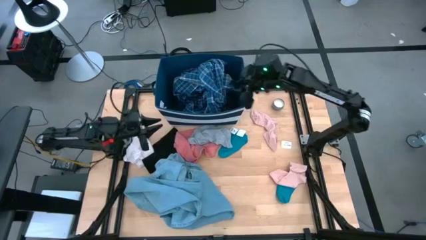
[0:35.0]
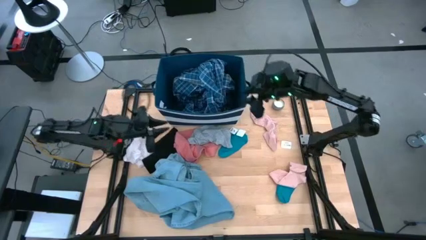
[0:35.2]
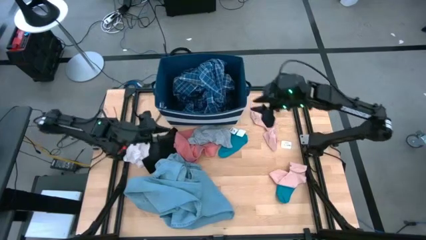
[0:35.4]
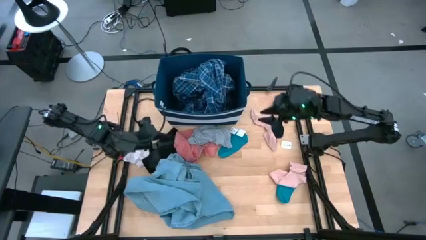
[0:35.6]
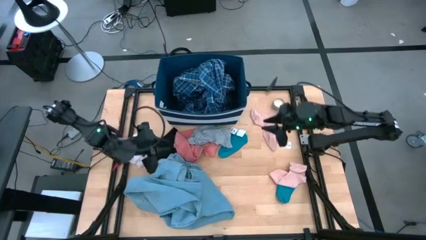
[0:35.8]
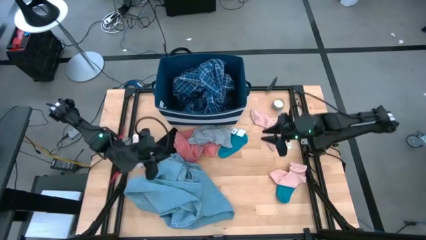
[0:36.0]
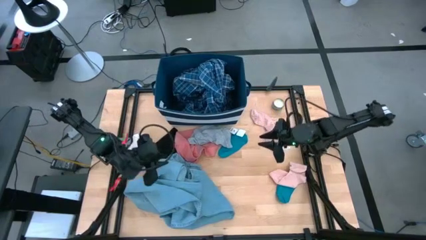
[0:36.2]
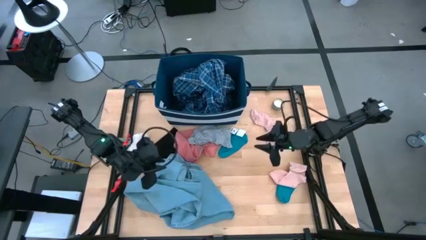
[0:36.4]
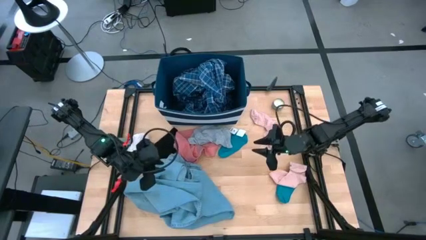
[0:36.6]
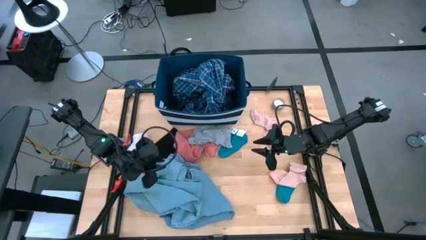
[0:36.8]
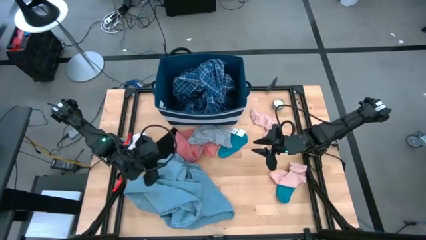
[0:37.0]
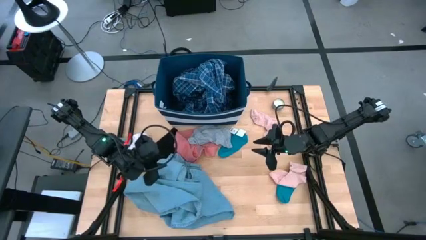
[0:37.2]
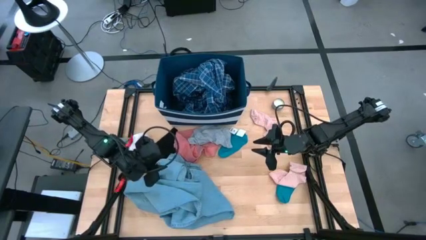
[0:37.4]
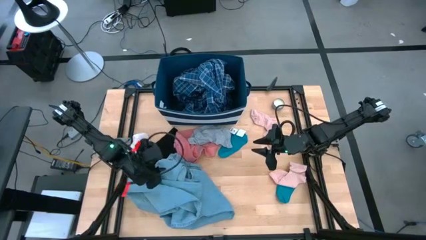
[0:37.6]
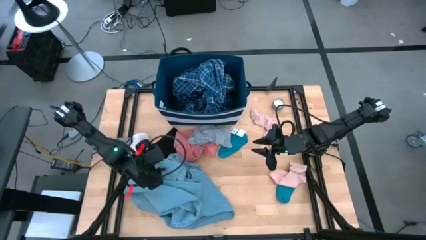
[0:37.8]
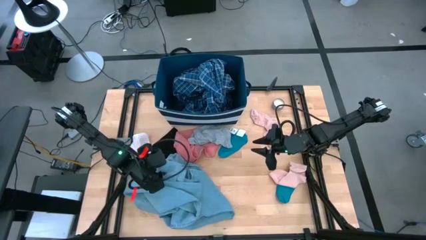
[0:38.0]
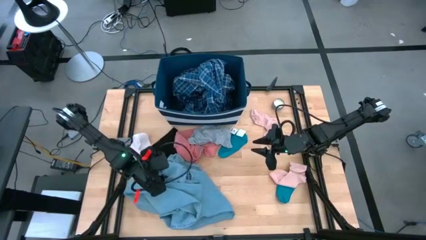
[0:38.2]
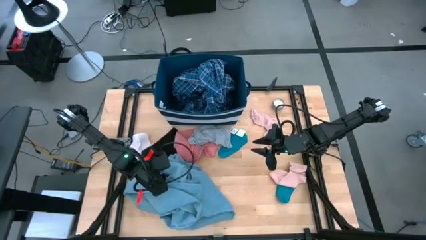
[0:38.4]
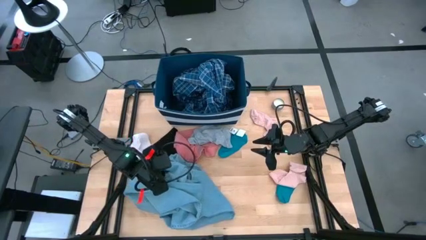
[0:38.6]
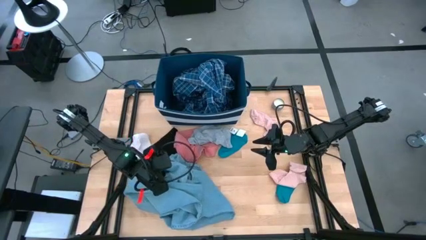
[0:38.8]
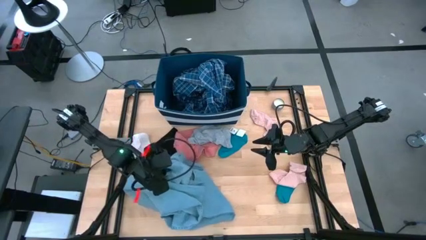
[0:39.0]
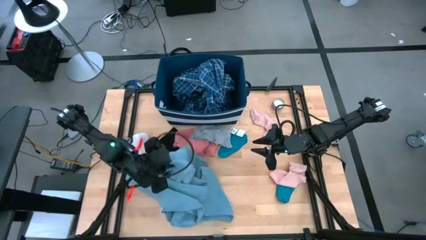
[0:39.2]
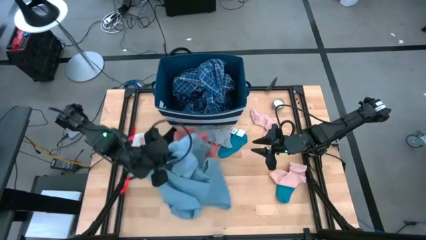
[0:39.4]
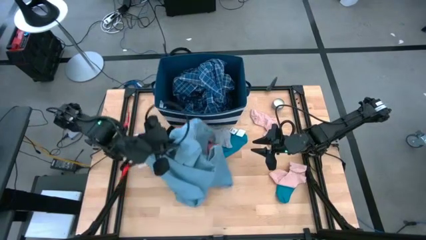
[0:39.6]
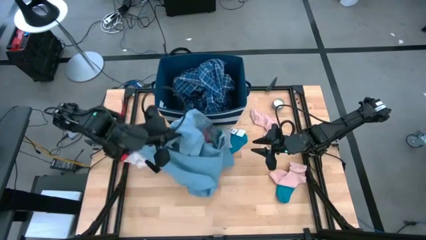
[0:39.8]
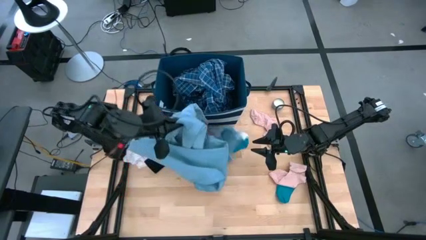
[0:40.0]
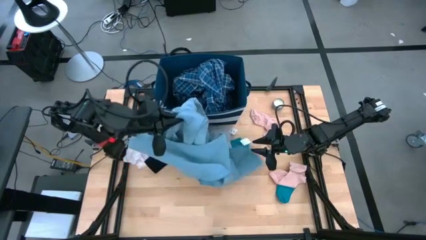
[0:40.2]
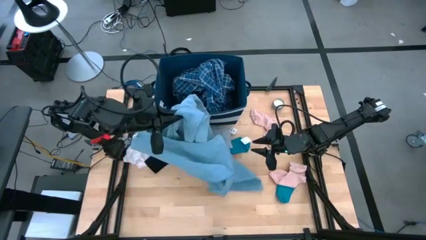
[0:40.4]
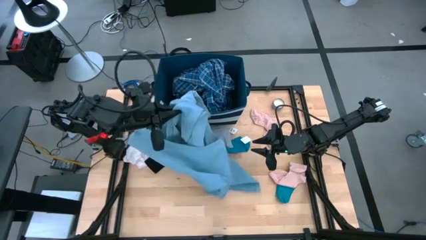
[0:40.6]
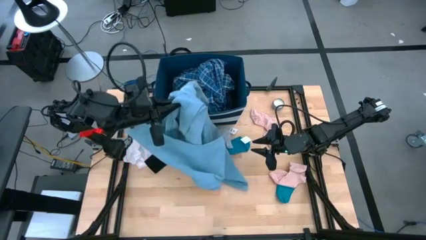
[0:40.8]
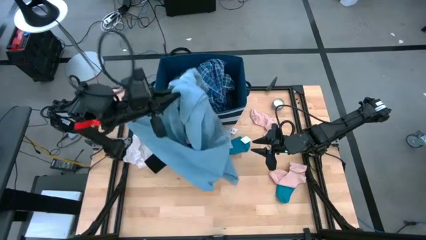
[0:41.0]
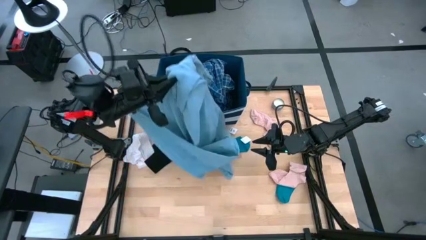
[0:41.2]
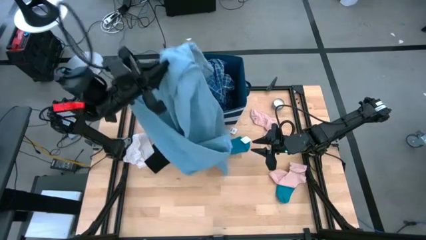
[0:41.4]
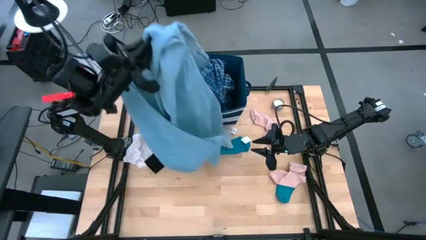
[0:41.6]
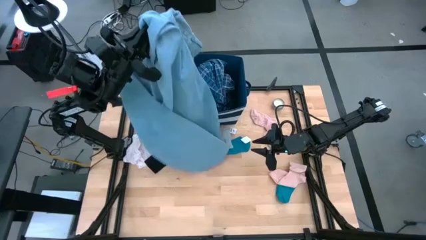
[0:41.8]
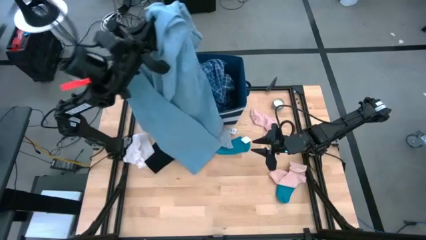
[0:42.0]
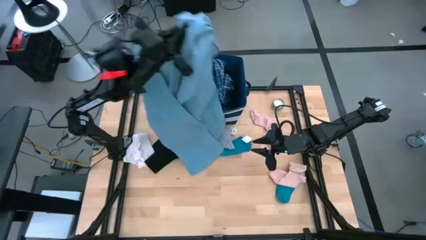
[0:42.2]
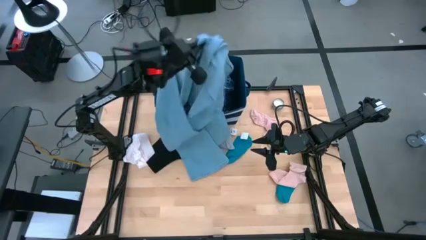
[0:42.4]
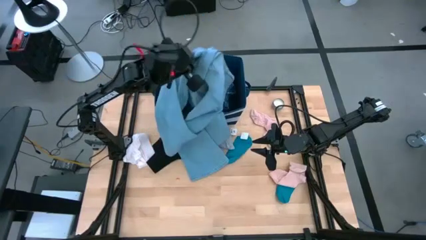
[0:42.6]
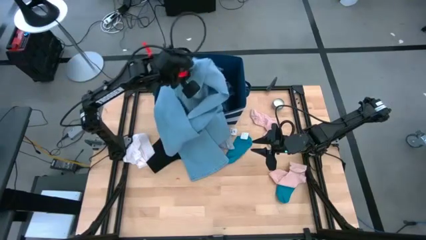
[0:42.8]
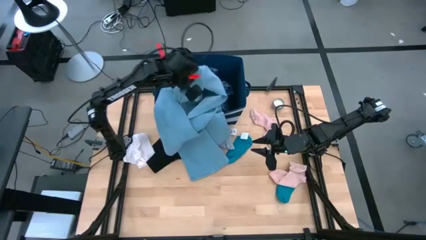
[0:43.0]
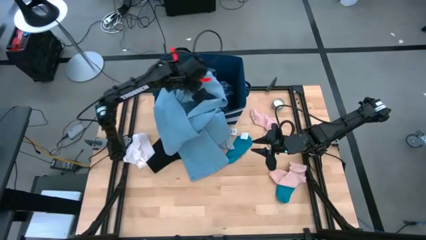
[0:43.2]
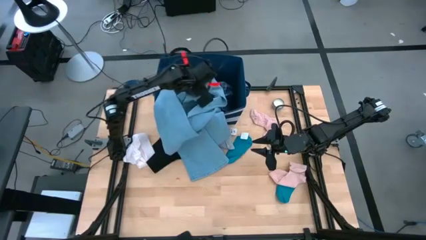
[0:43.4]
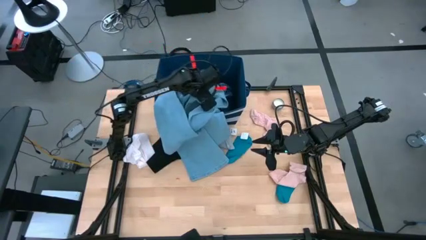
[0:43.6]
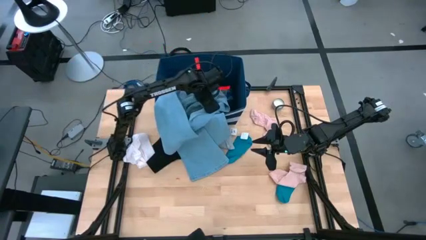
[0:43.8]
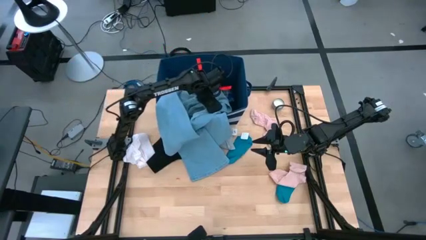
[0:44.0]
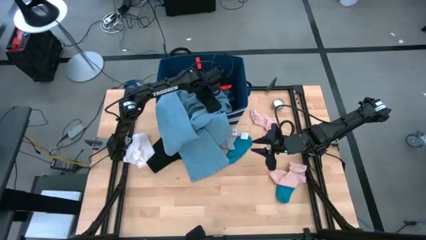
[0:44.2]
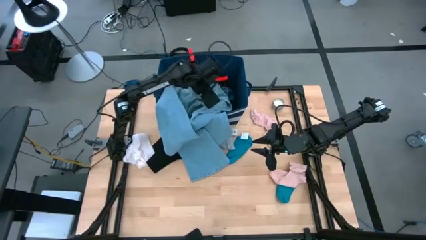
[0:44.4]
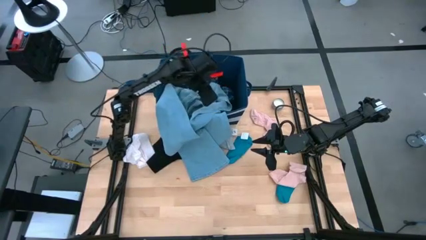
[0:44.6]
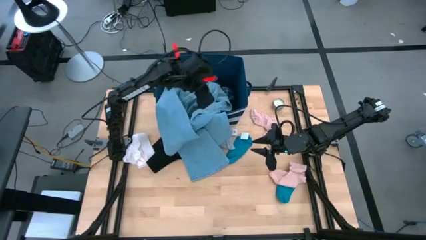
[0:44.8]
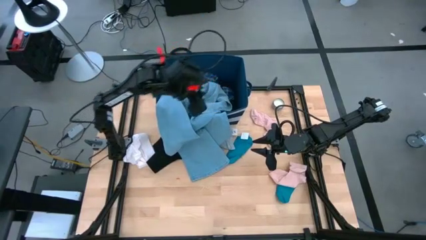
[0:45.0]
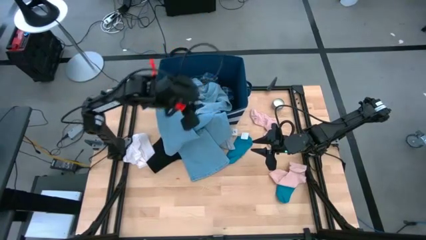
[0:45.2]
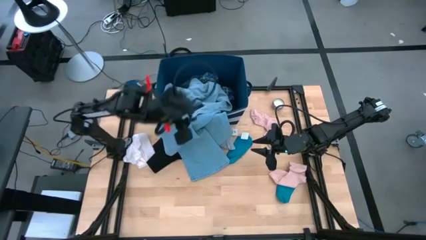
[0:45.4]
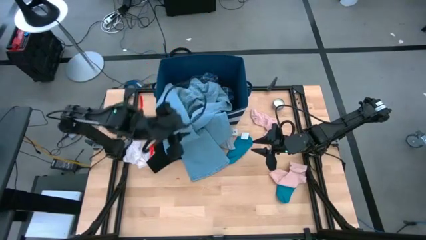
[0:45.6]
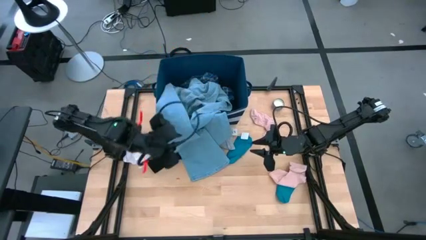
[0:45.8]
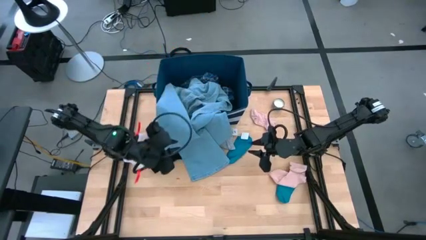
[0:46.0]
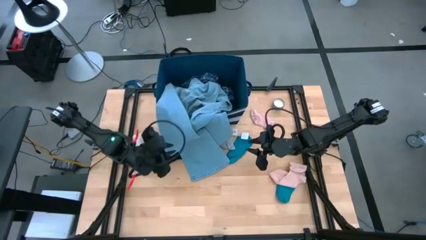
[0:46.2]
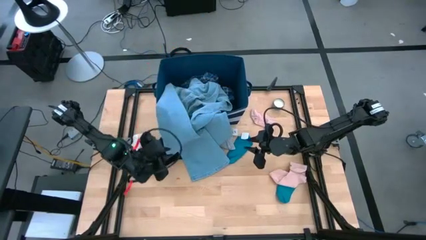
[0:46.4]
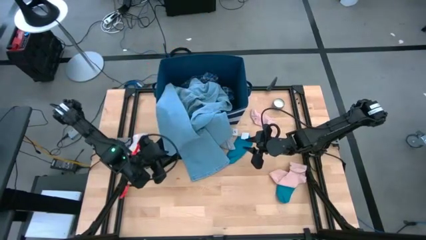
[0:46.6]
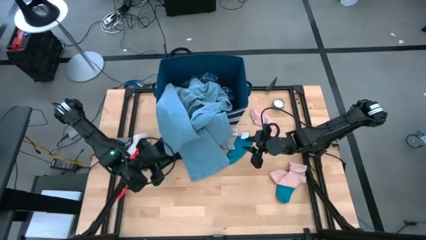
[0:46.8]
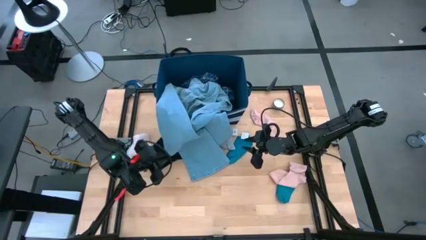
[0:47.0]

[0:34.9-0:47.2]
Task: Sort clothes
Put the blue jeans into the blue bin
